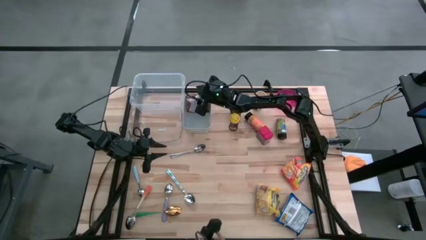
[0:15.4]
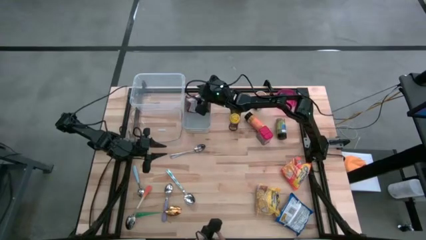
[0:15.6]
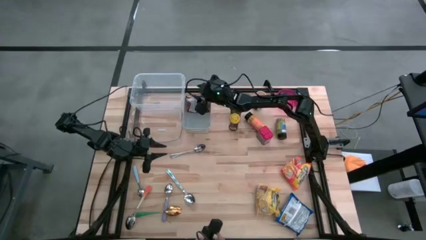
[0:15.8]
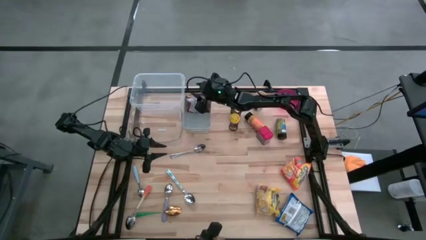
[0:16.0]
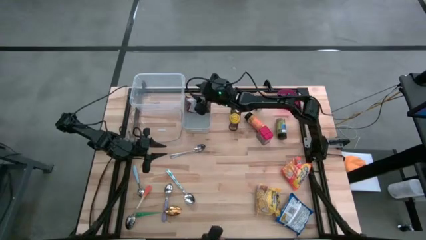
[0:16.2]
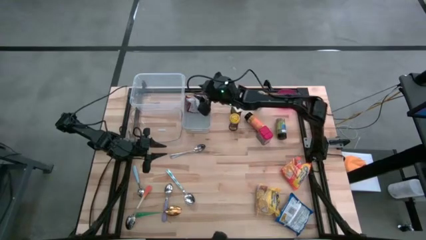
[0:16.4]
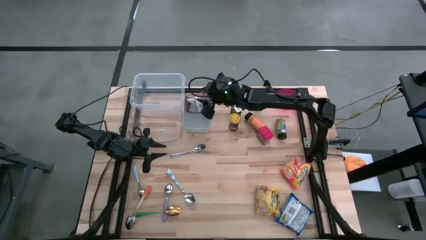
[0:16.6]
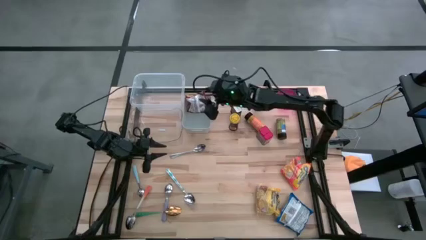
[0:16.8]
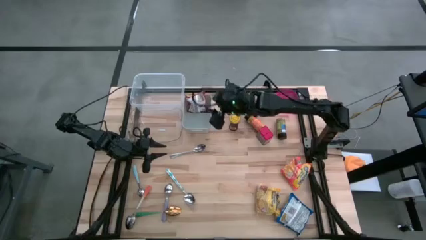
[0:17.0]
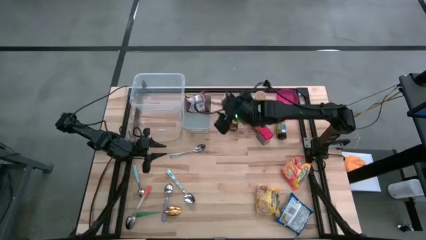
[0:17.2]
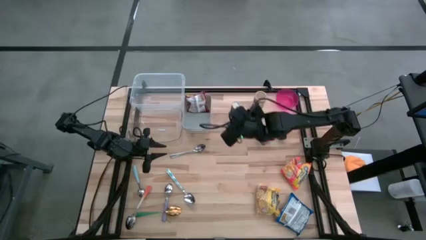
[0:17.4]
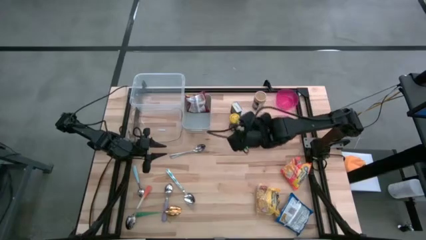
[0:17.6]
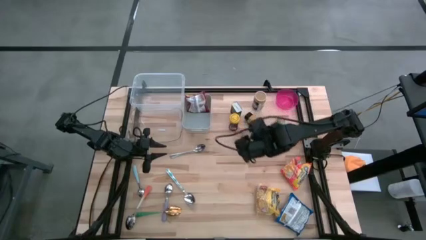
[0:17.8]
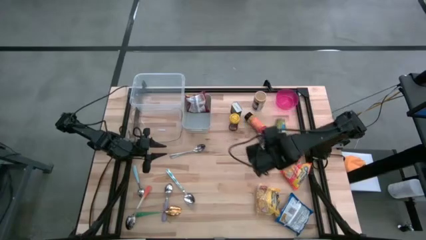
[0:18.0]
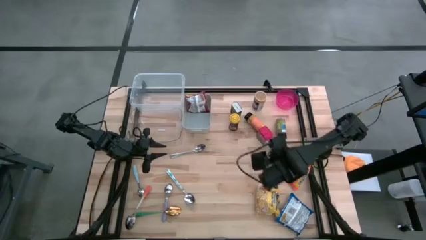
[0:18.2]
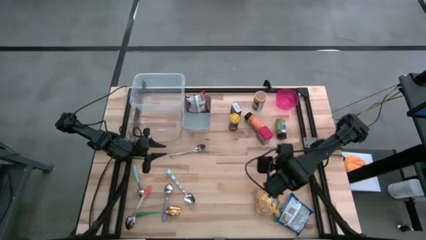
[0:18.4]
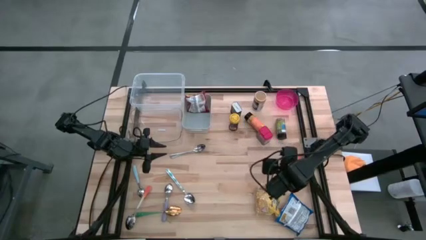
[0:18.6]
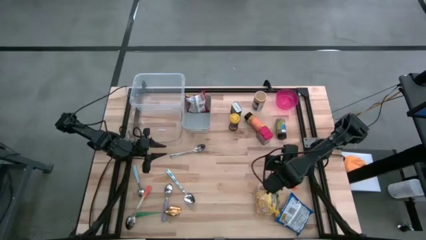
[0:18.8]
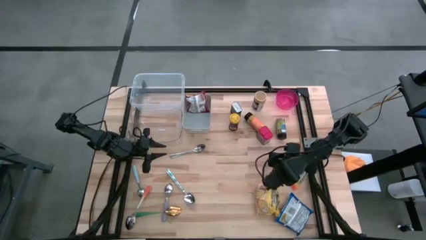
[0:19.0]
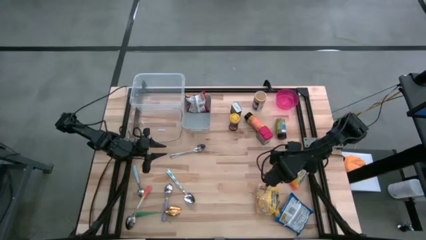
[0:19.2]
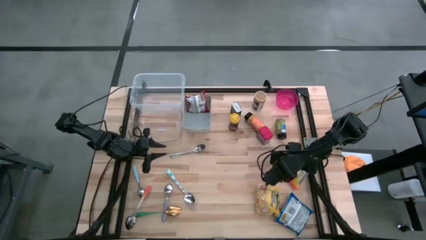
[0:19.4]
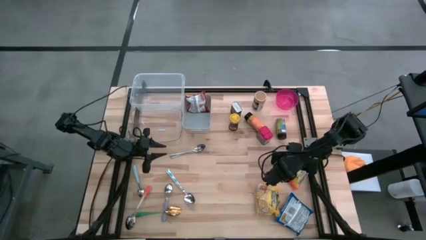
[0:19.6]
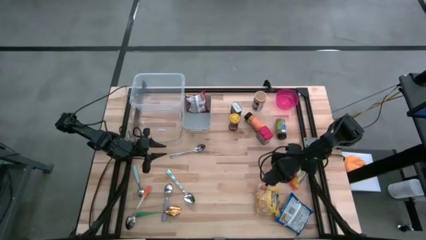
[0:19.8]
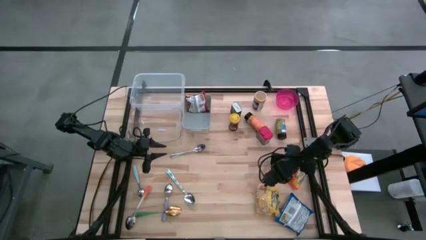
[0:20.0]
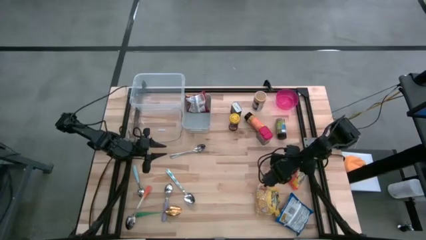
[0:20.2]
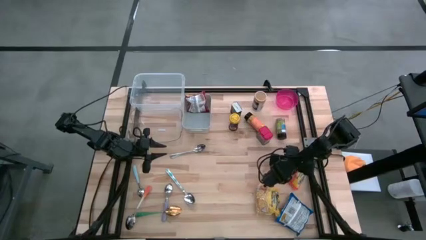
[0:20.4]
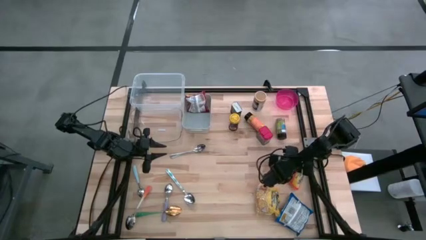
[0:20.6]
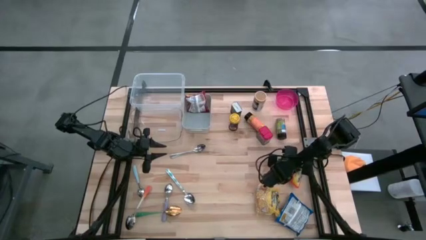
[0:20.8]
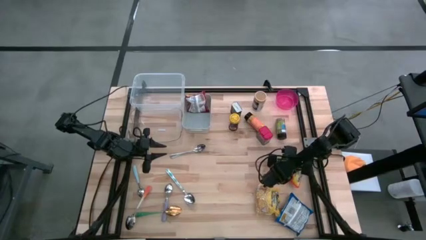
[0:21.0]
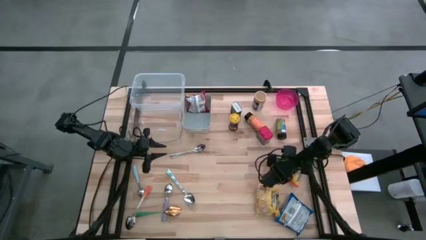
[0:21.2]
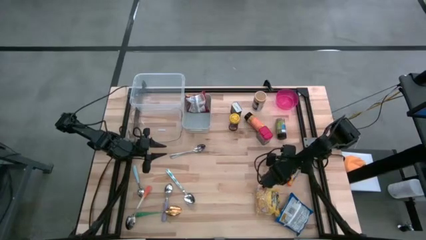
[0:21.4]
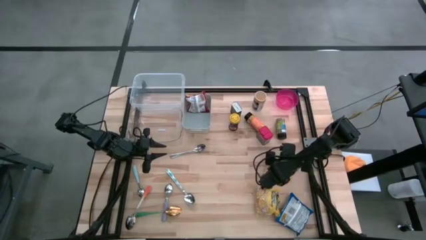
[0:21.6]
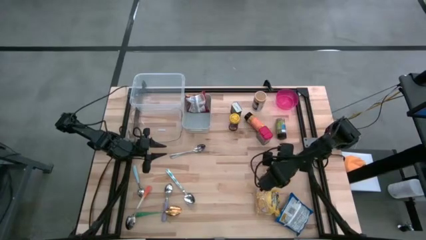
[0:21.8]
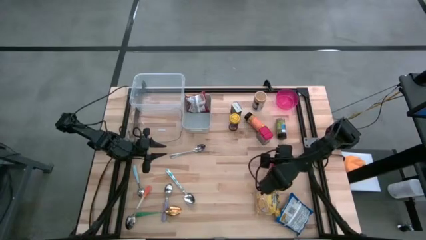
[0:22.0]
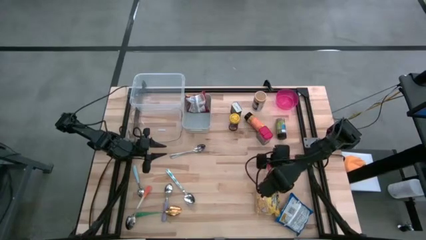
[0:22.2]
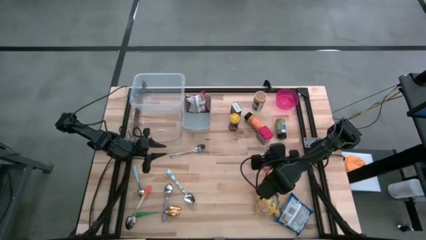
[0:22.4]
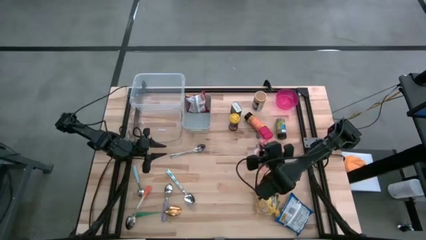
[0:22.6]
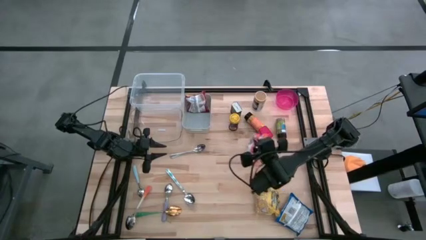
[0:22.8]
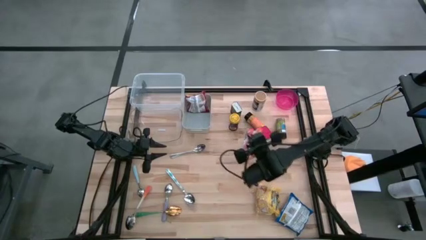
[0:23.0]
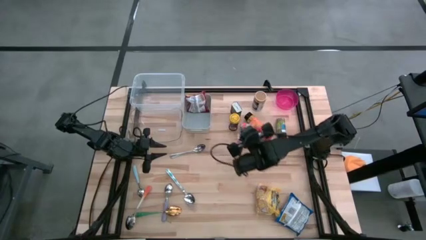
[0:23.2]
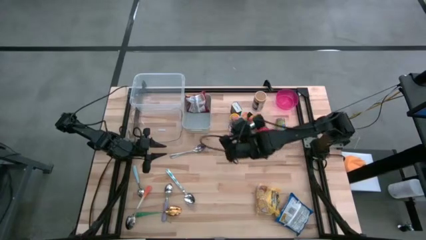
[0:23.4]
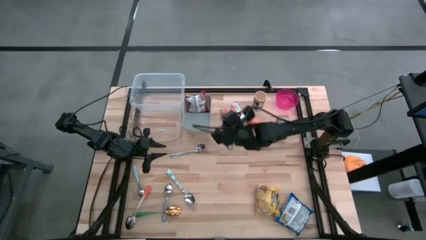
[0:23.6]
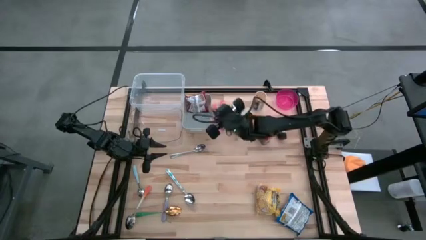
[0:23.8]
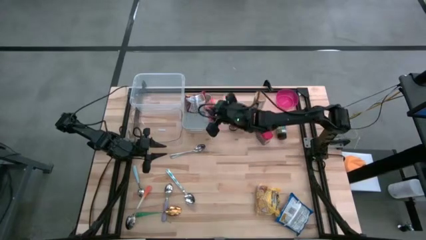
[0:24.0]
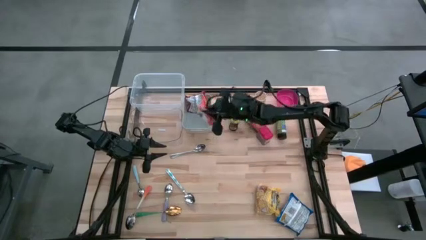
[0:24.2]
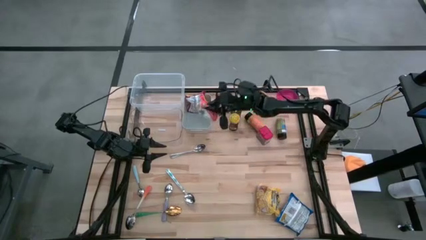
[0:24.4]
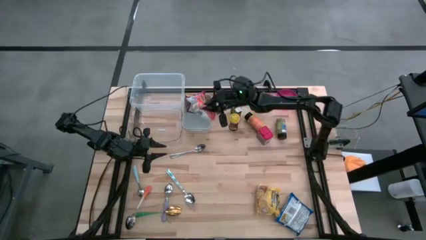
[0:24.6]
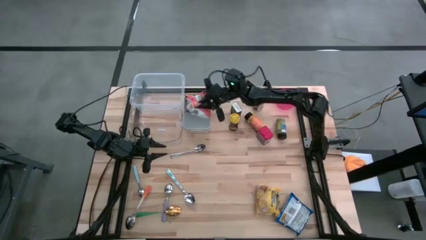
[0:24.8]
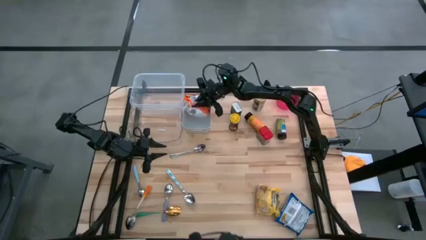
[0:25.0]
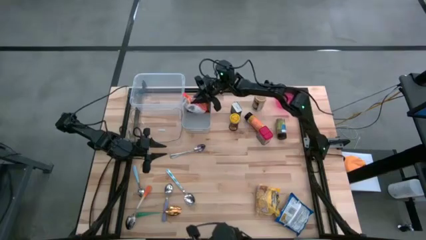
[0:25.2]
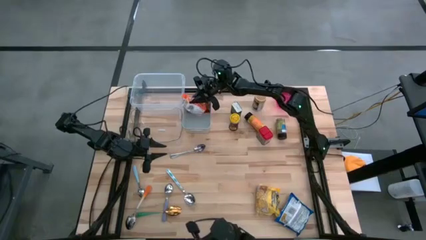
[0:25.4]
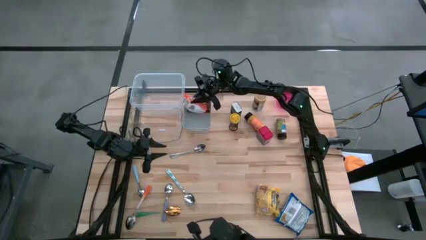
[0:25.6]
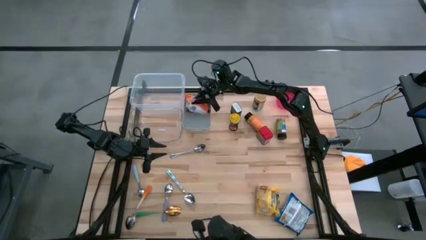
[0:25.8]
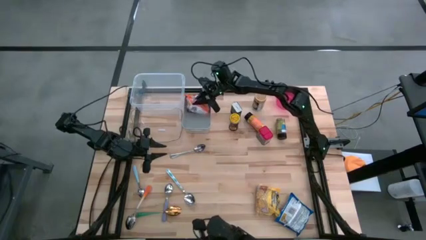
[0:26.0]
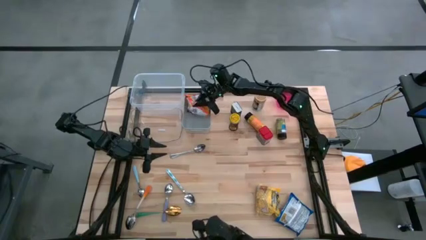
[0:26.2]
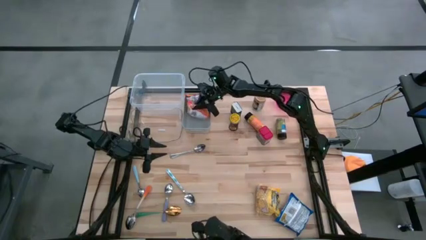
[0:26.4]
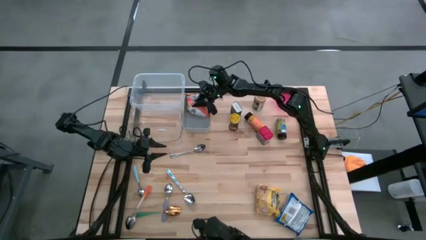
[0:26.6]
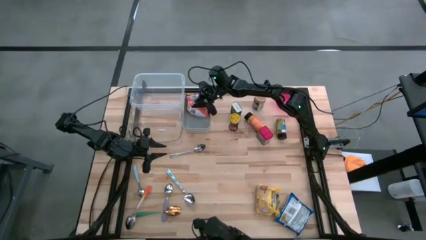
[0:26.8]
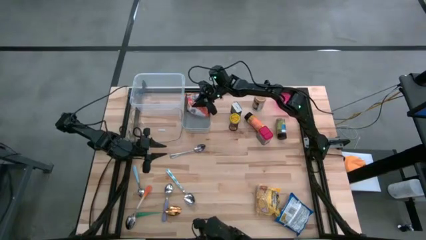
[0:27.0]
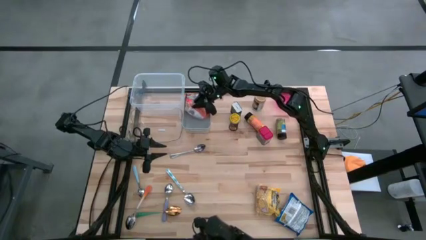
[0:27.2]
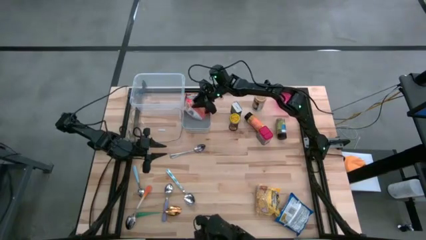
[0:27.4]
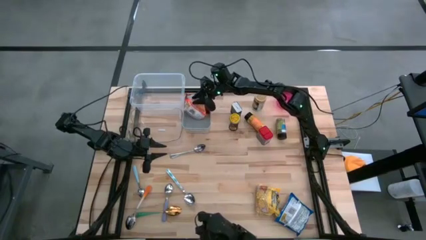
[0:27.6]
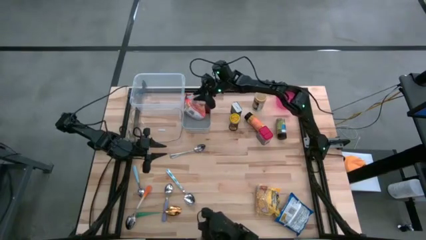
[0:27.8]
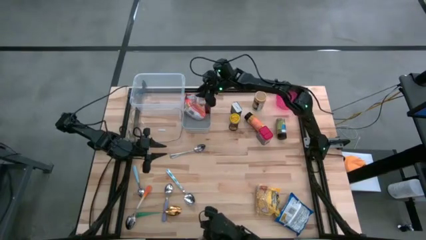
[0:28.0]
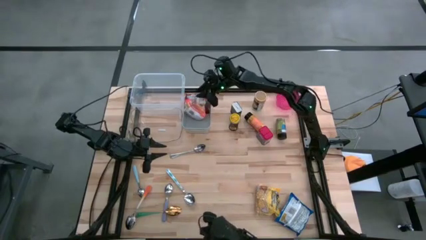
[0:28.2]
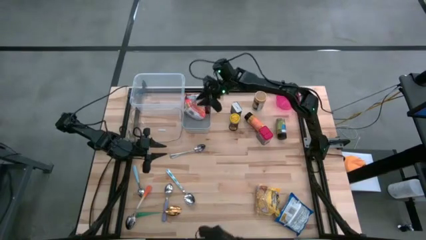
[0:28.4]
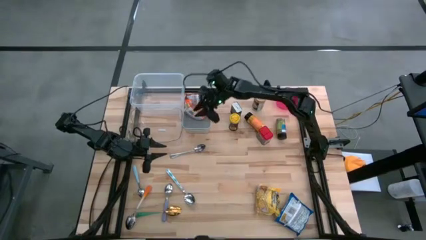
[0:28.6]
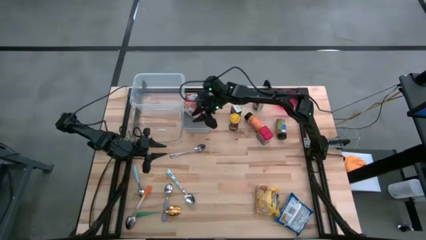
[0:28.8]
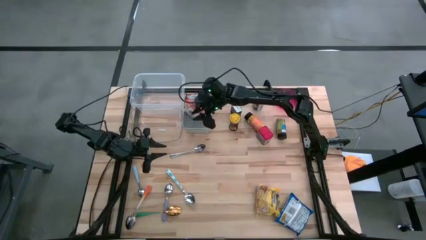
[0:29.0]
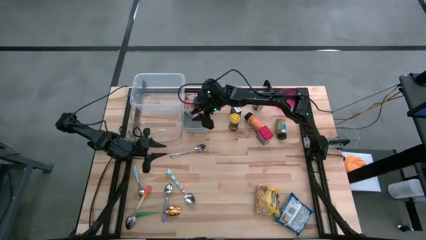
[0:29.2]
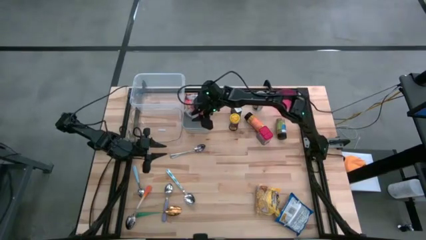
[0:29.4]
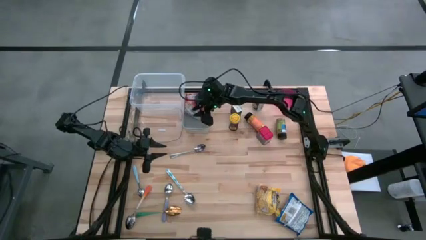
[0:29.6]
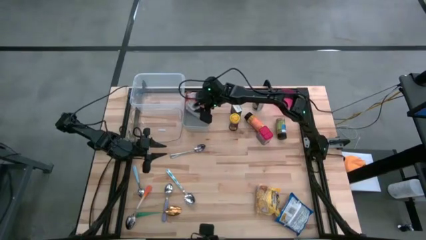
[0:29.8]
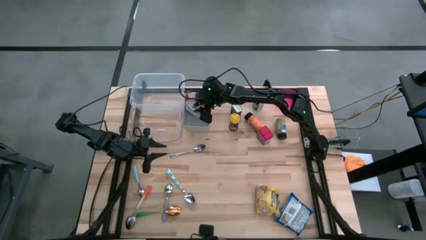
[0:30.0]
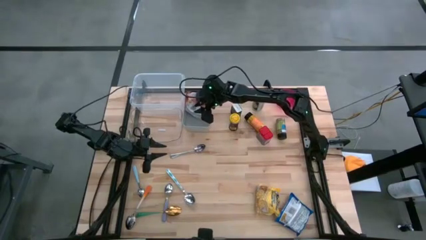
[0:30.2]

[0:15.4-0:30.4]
Put the orange noodle pack into the gray bin
